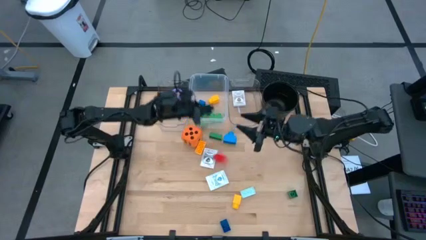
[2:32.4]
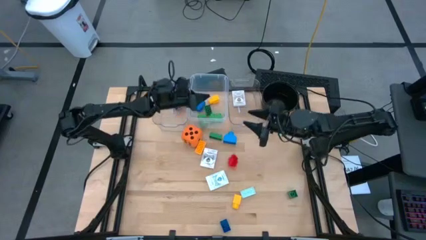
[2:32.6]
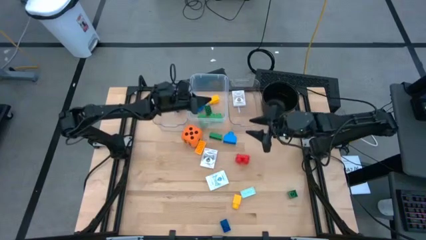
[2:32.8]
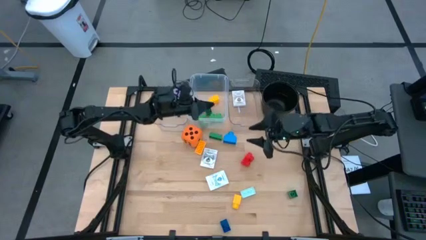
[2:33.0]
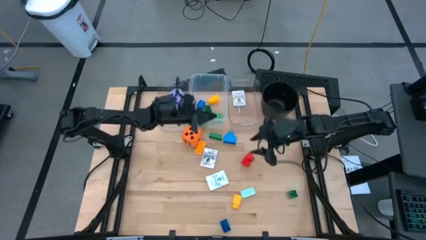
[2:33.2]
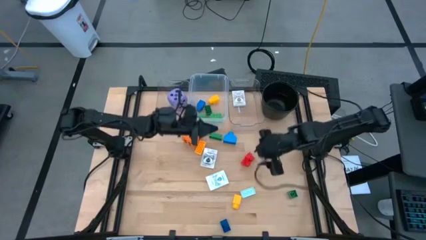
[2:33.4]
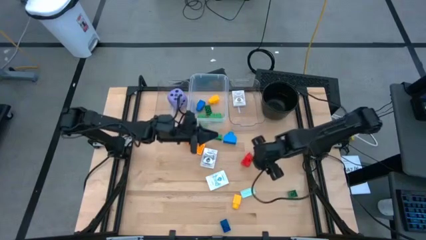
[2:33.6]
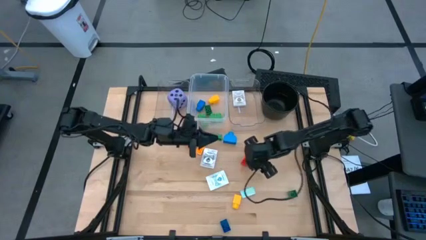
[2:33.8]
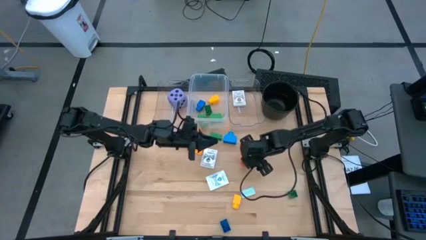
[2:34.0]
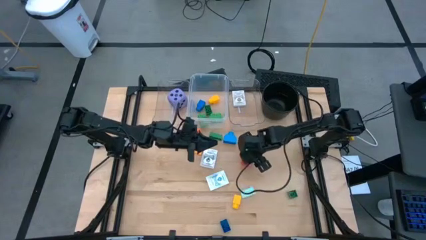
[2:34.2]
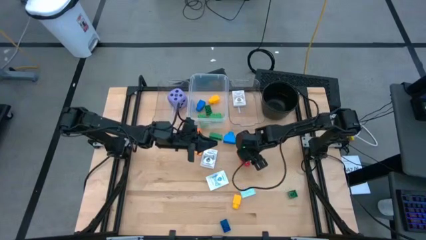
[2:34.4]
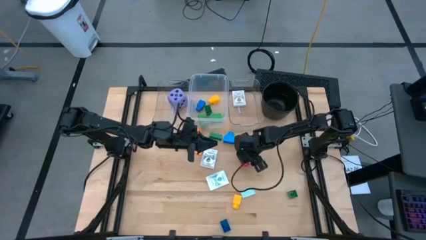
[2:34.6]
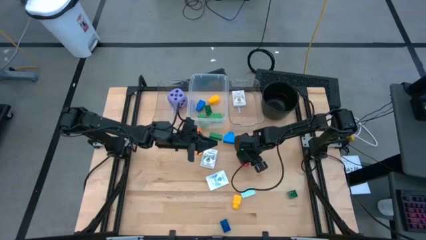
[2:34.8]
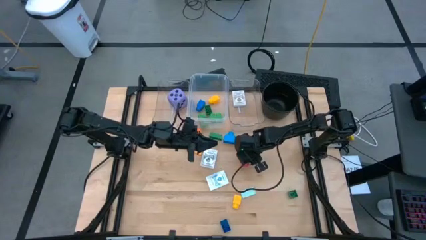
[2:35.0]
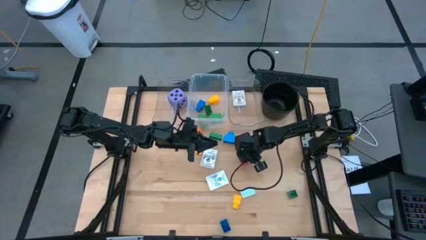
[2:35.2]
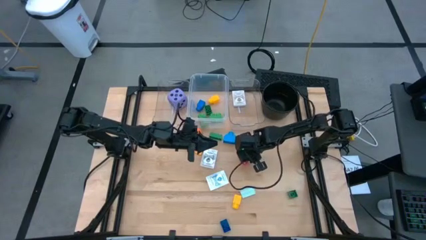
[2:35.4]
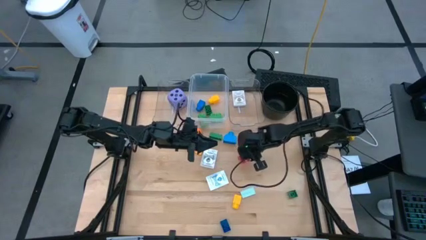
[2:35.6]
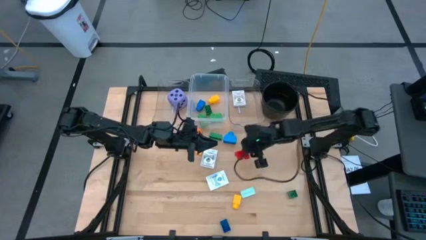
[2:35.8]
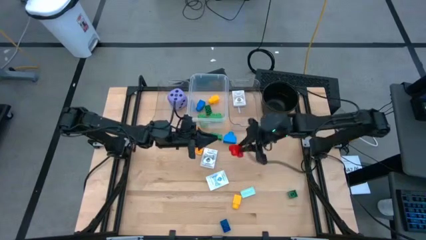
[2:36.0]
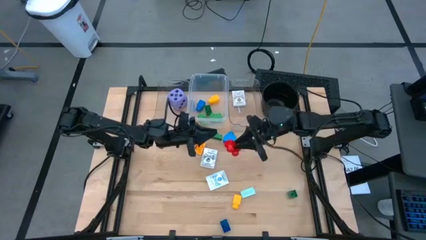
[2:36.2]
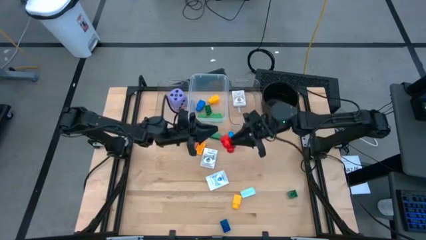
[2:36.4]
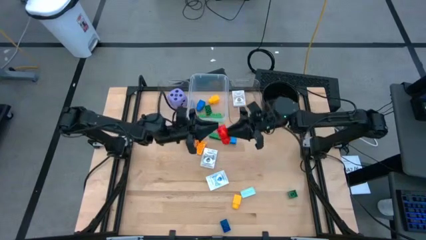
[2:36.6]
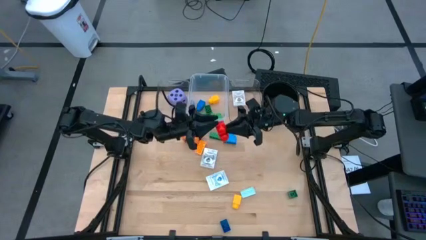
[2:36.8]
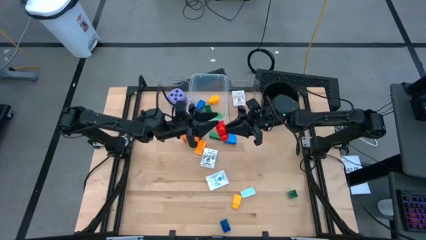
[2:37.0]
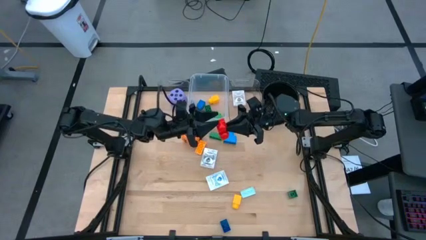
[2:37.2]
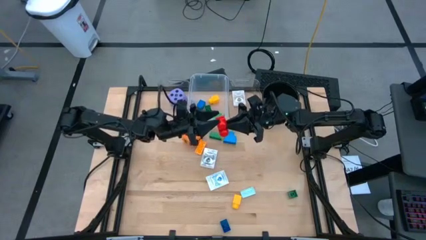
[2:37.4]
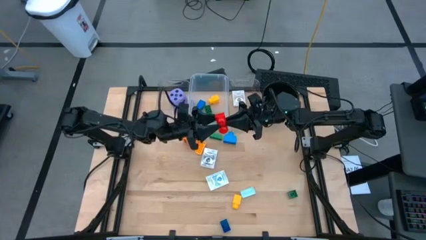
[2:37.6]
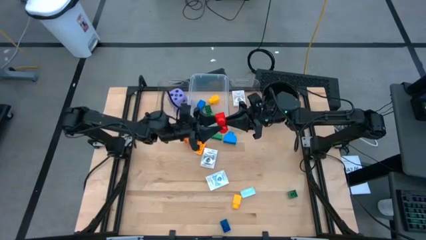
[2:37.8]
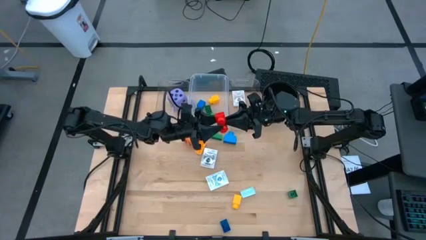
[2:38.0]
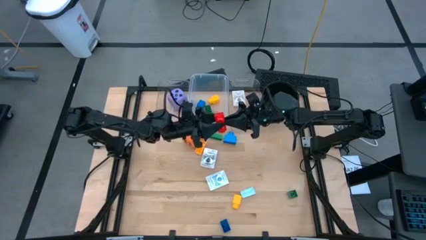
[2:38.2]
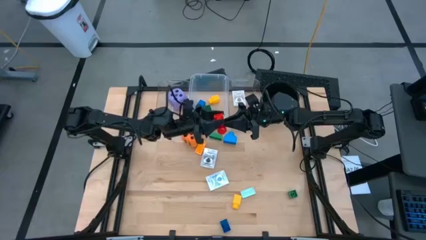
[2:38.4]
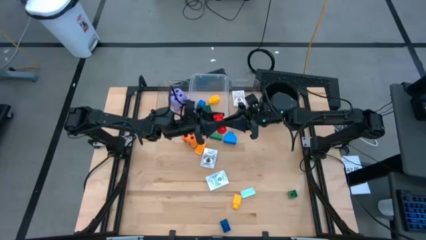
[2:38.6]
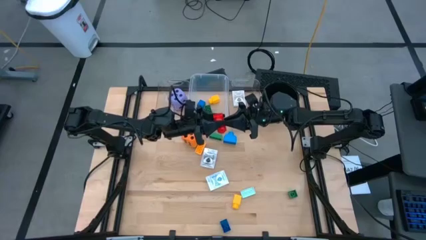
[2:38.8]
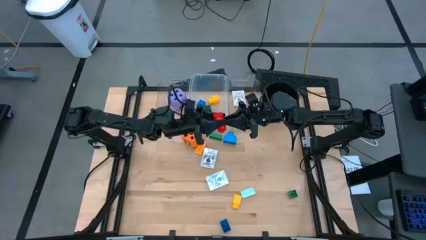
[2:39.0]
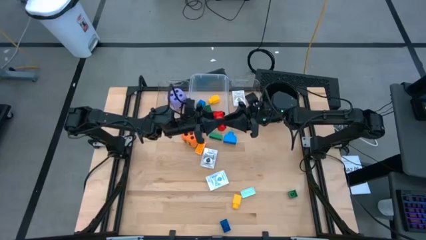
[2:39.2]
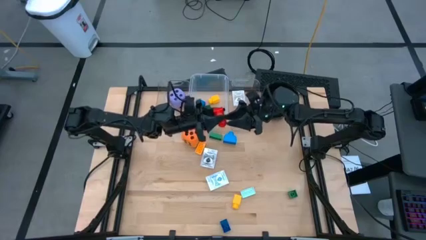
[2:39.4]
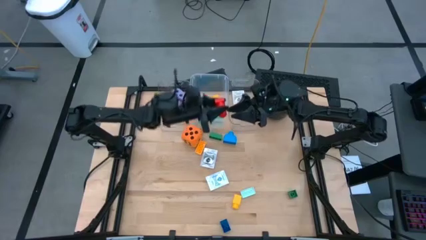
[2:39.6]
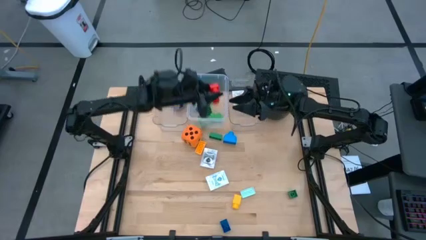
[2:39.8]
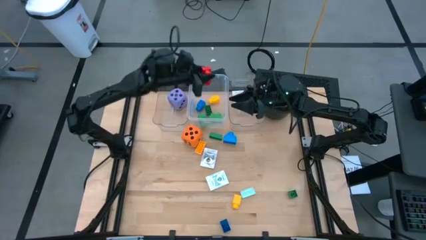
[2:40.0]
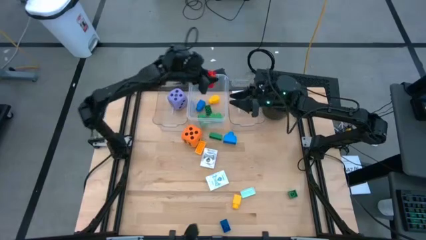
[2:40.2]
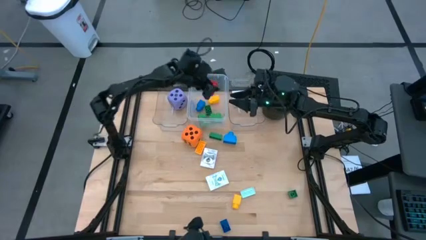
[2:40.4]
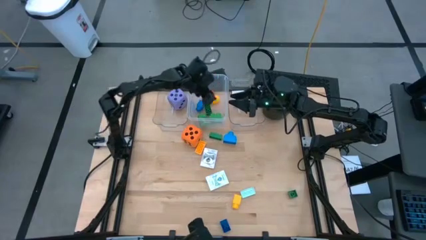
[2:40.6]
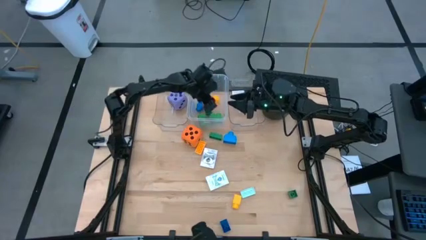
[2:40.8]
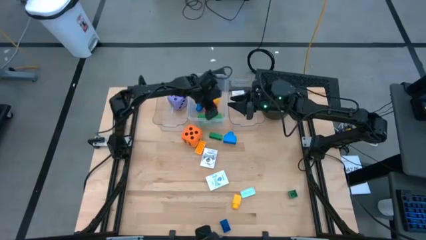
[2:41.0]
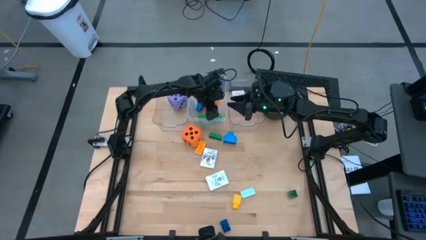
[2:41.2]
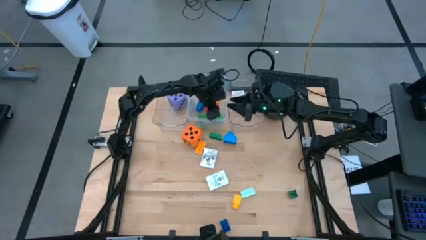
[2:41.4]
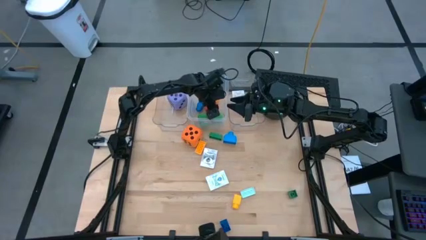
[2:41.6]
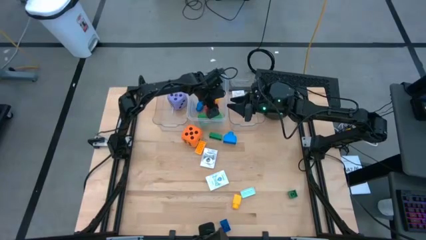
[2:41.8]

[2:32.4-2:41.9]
Task: Pick & Place Toys
Put the red two stud game piece into the middle transparent bin

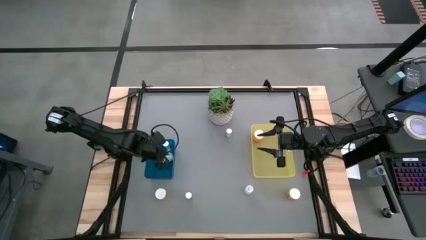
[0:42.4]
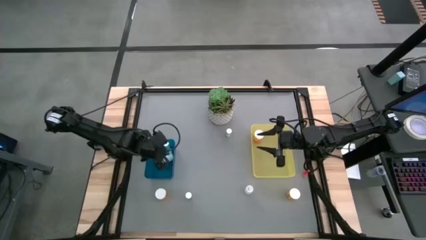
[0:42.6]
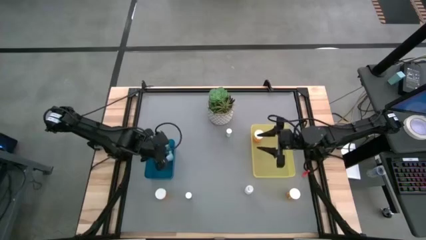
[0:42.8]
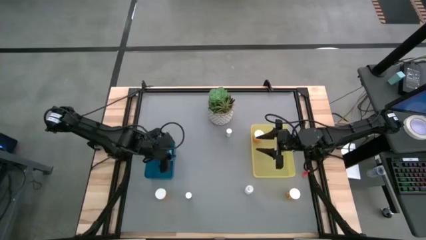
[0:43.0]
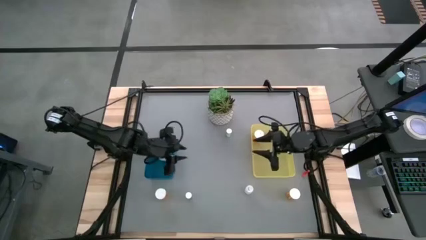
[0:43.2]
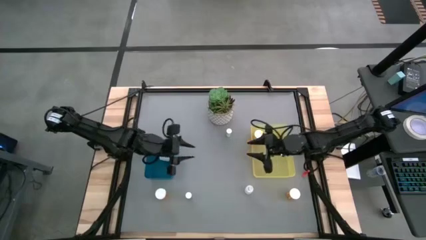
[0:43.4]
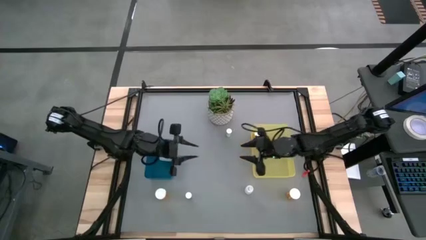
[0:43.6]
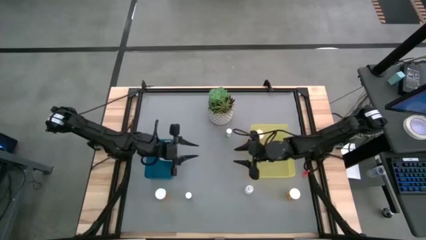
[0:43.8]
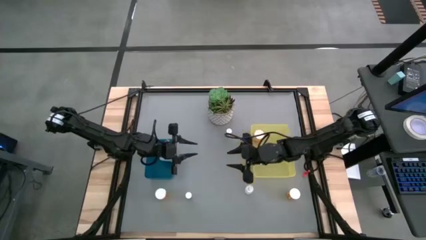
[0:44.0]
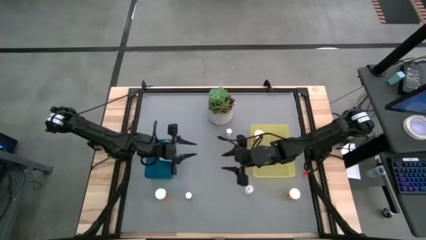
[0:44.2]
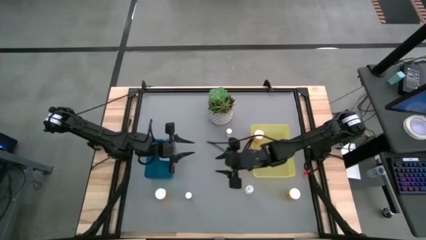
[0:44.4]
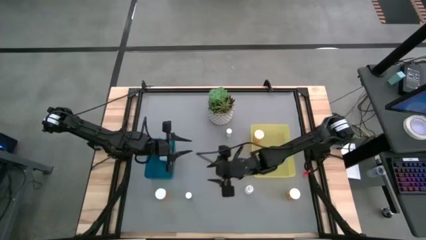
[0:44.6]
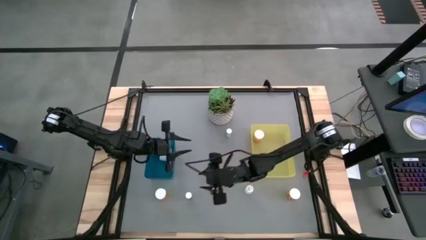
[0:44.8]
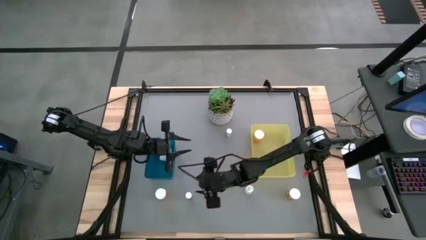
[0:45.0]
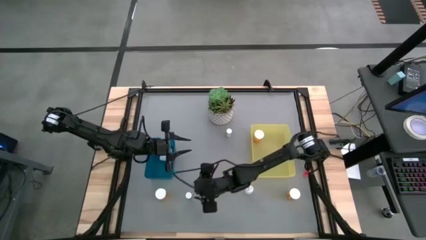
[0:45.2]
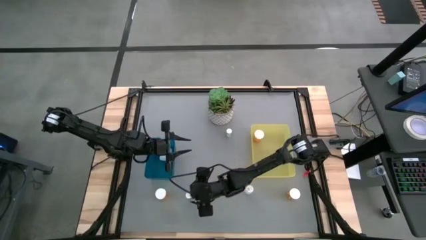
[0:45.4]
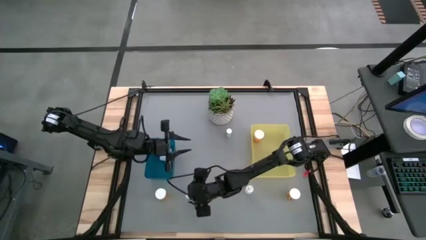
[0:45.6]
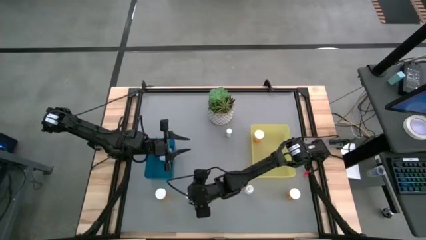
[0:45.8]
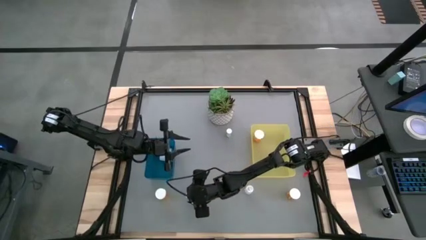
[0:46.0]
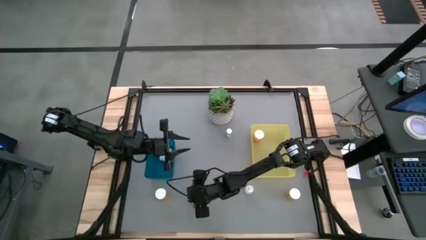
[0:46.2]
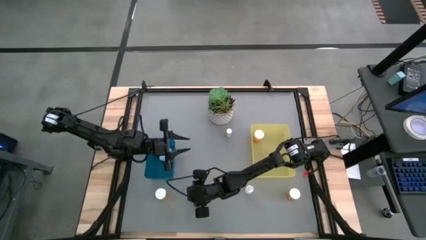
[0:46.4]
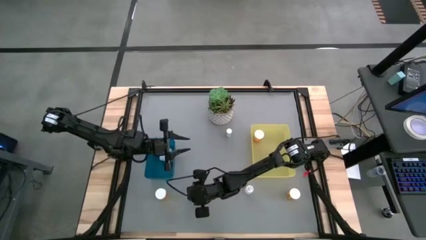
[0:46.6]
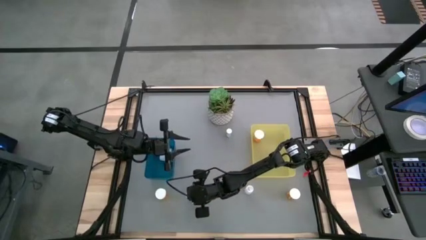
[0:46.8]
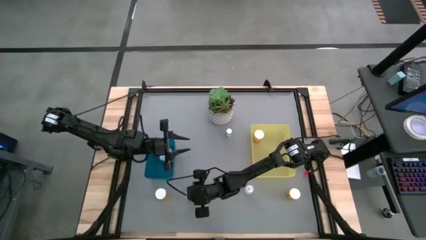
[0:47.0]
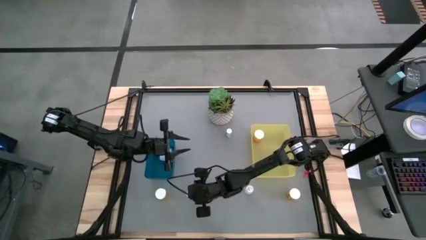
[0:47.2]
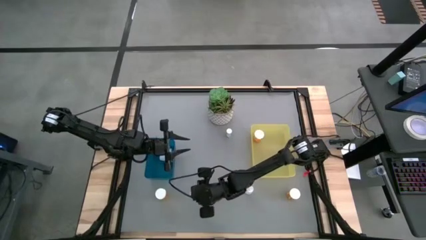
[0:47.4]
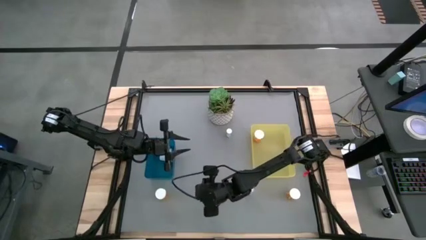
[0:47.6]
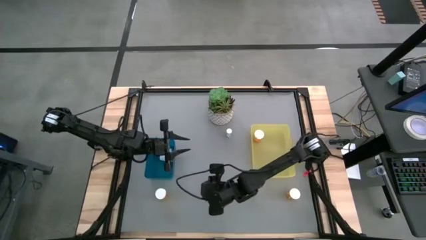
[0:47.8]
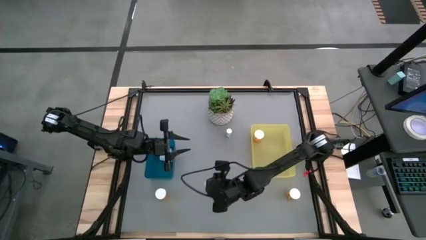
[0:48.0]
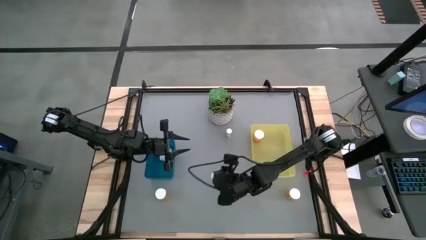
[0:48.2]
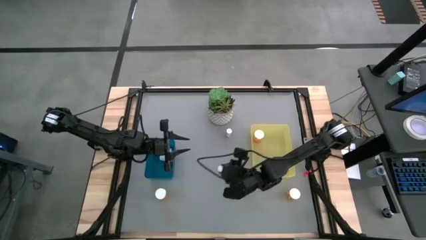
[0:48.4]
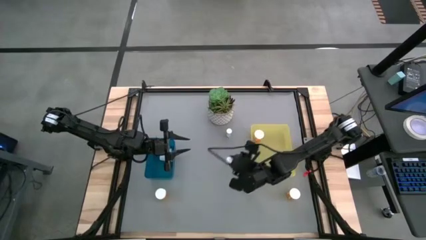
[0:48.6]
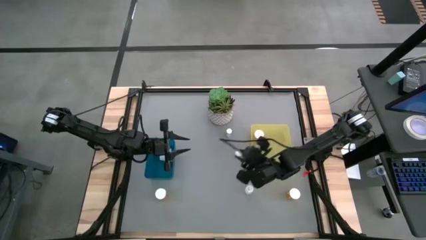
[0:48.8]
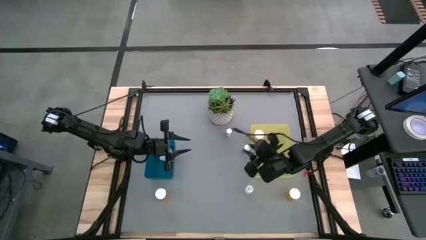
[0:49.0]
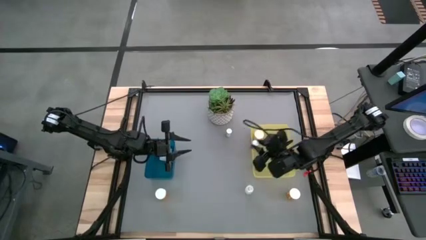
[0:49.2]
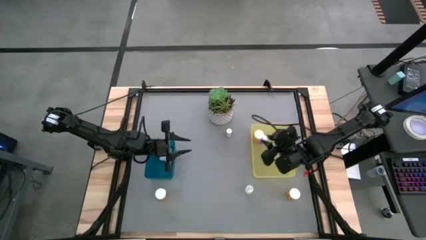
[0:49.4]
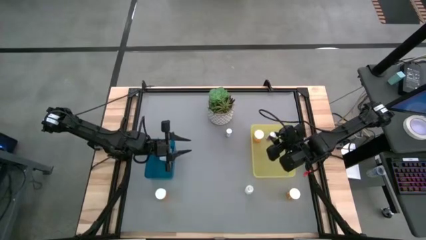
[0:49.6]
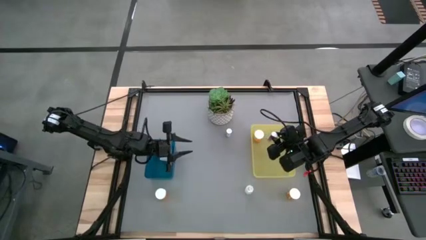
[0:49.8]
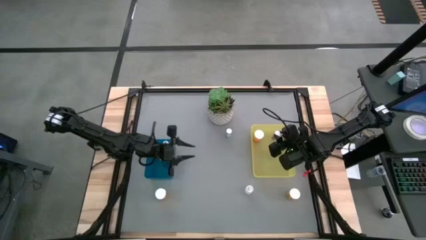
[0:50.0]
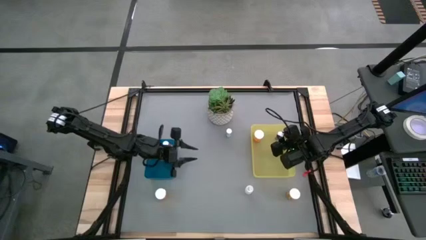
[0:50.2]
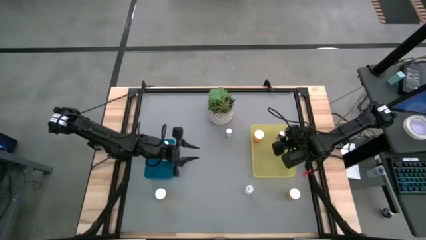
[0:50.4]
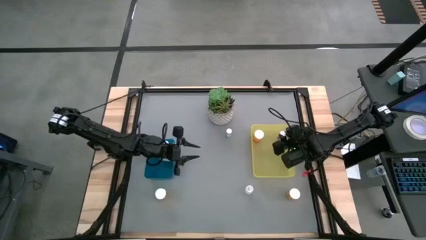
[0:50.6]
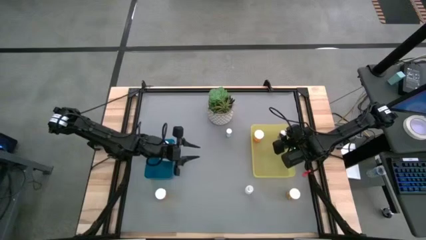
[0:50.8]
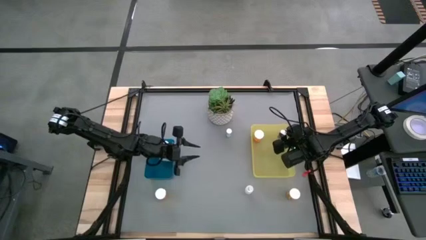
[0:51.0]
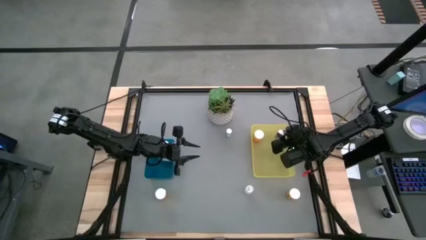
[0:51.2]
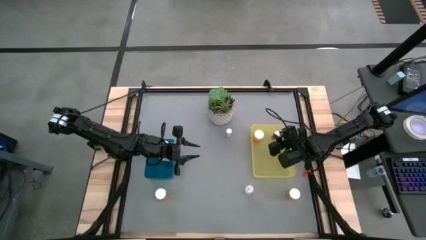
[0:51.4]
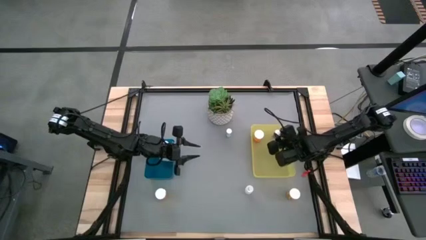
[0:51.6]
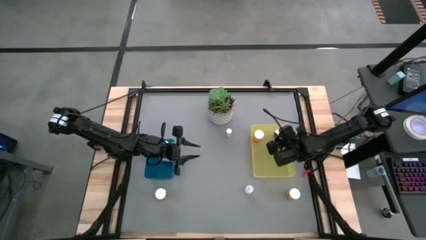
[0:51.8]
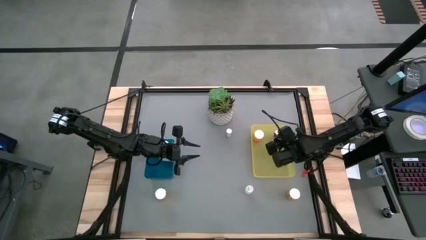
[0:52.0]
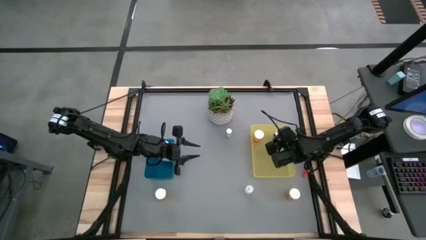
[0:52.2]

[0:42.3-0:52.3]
Task: Pick and place medicine bottles into bin by pill shape (circle, oval)
Put the blue capsule bottle into the right yellow bin
